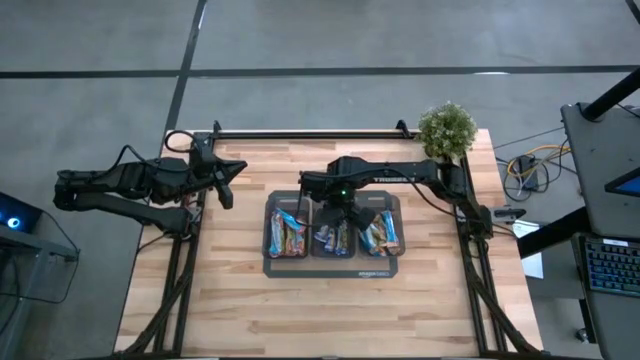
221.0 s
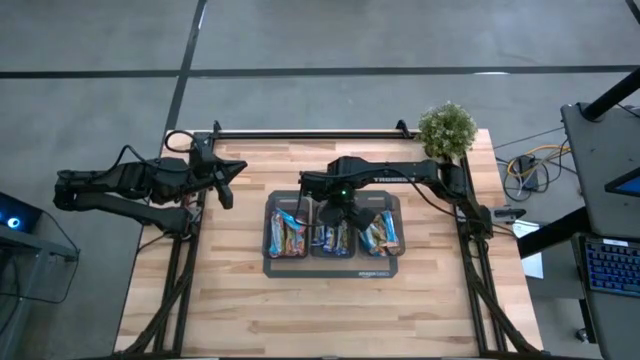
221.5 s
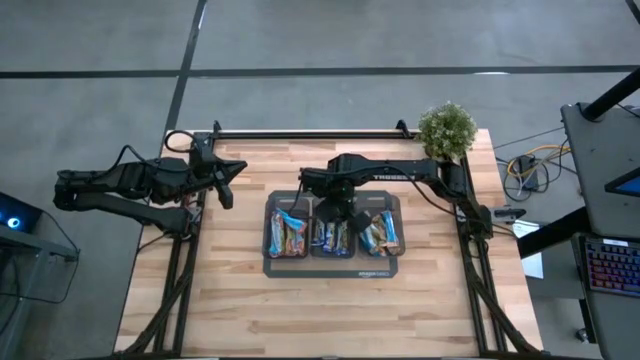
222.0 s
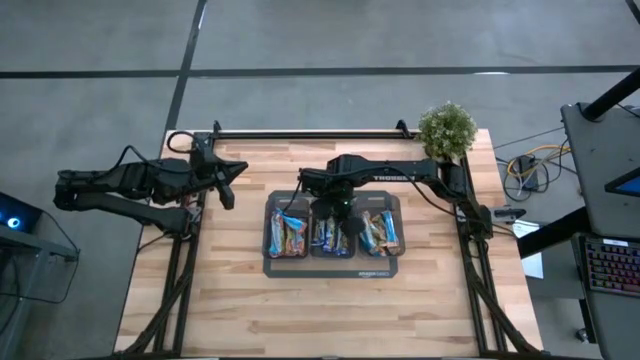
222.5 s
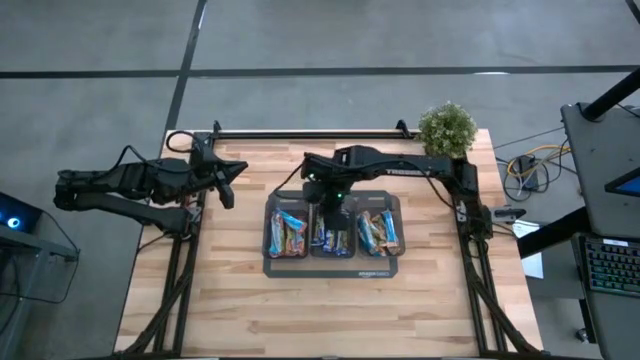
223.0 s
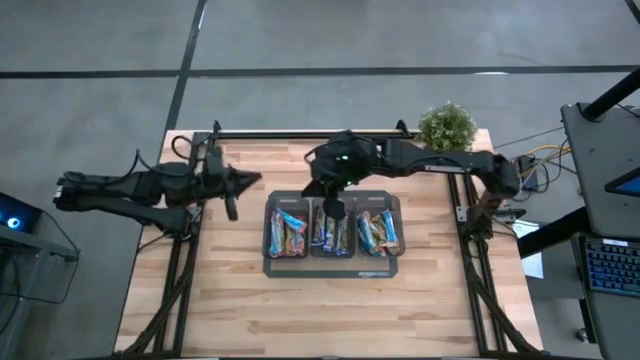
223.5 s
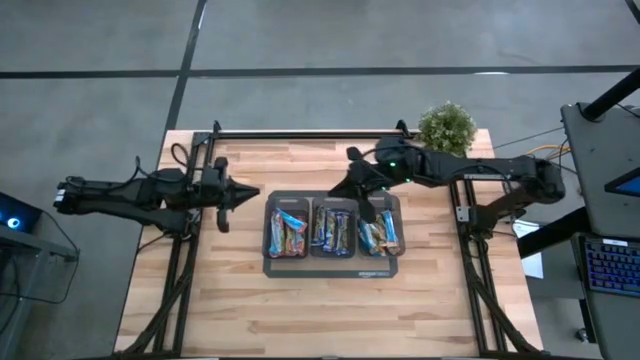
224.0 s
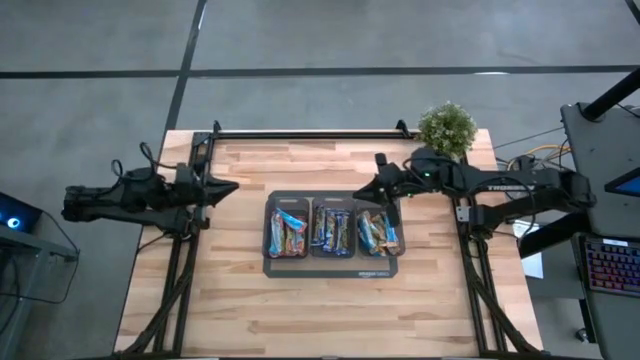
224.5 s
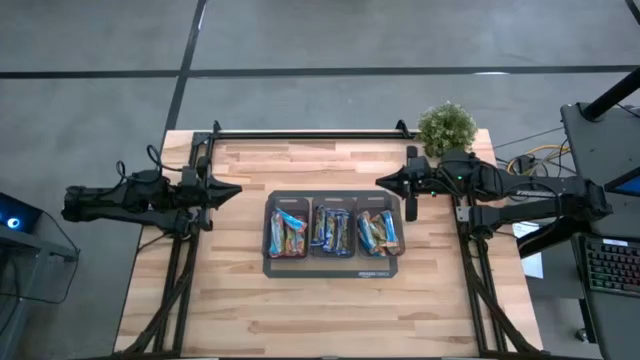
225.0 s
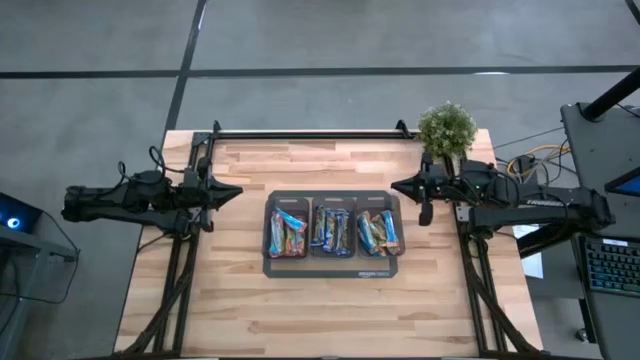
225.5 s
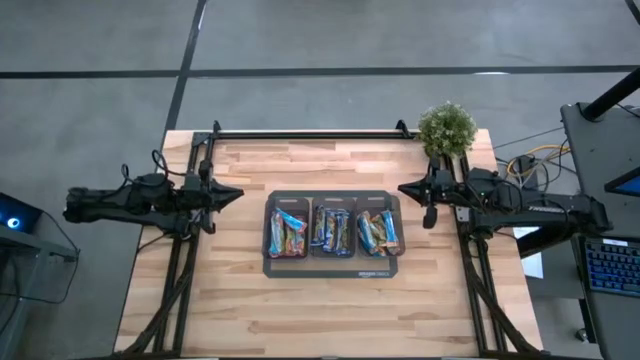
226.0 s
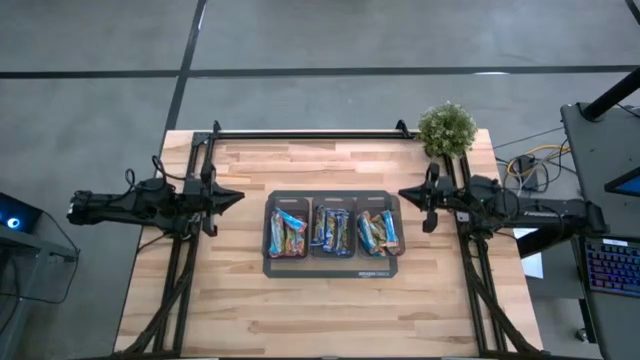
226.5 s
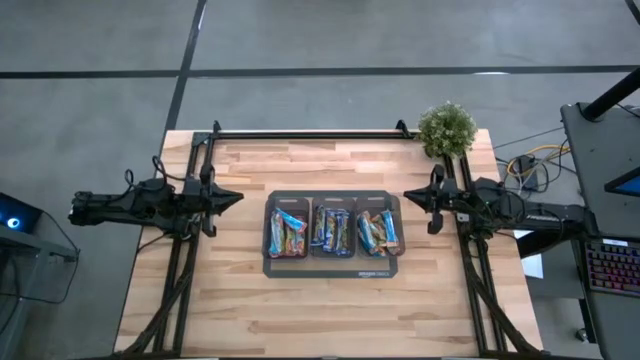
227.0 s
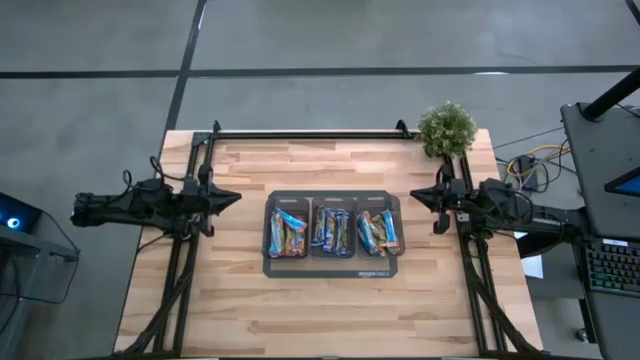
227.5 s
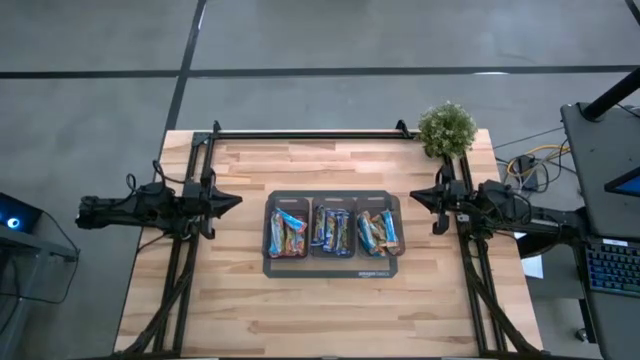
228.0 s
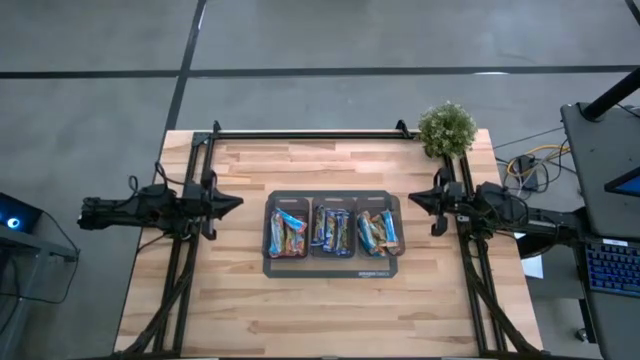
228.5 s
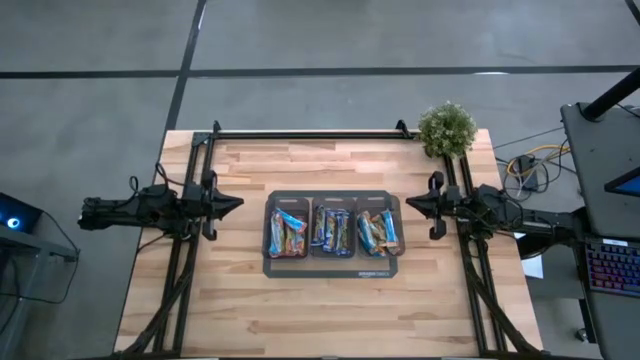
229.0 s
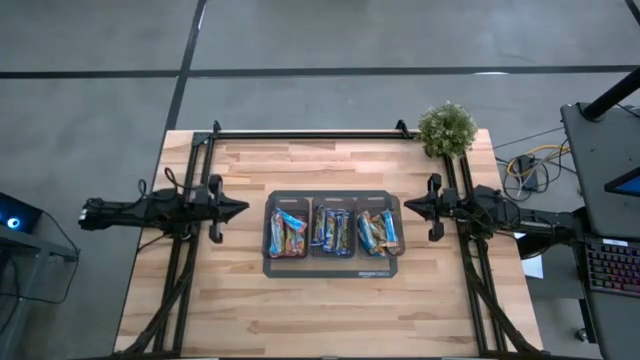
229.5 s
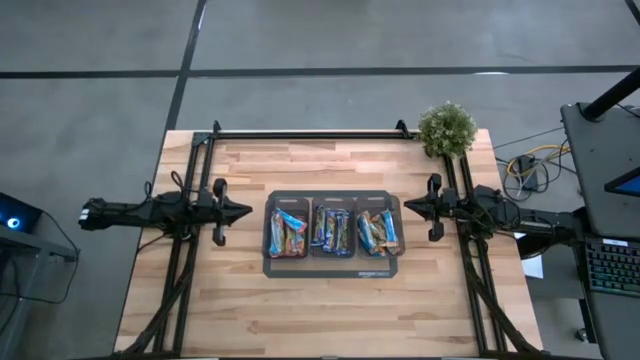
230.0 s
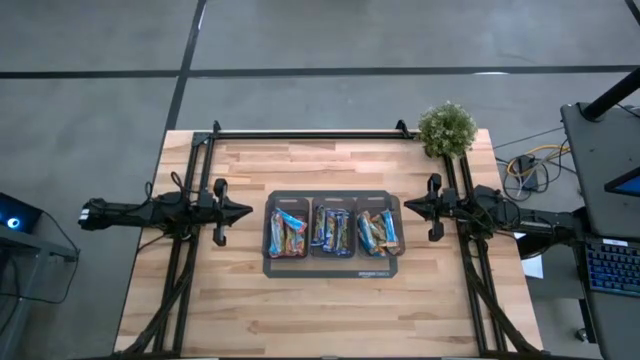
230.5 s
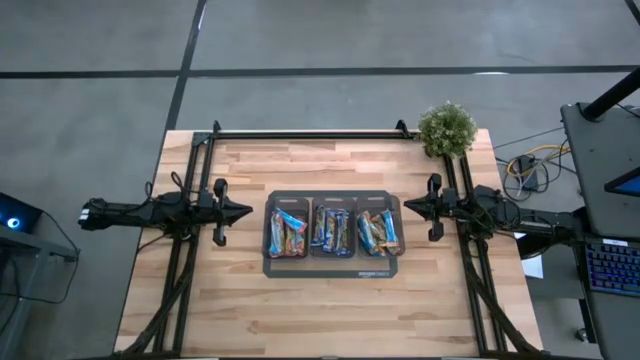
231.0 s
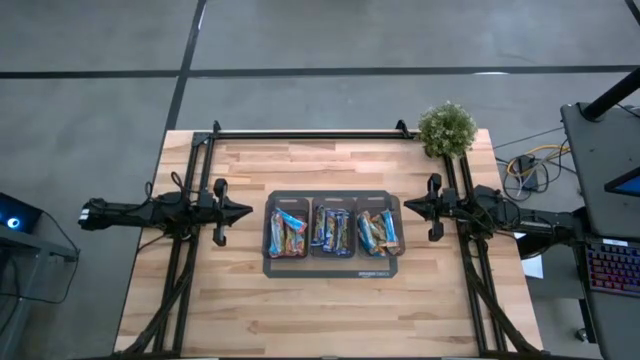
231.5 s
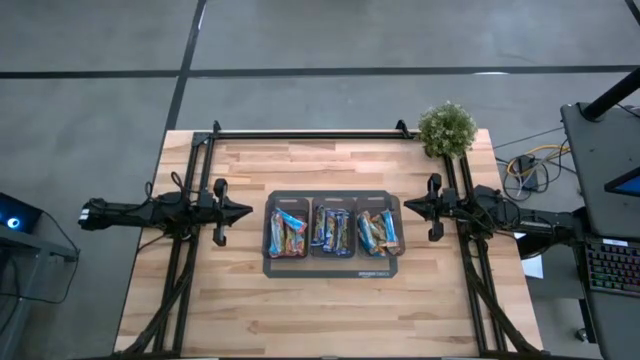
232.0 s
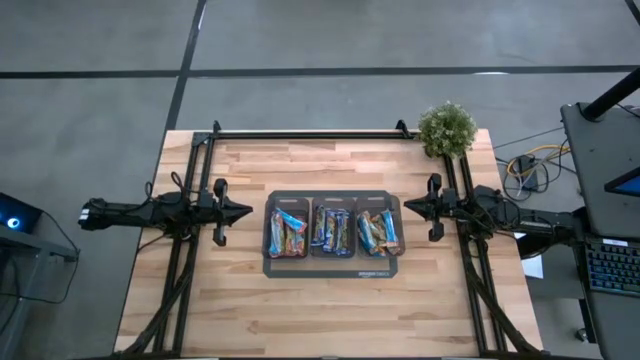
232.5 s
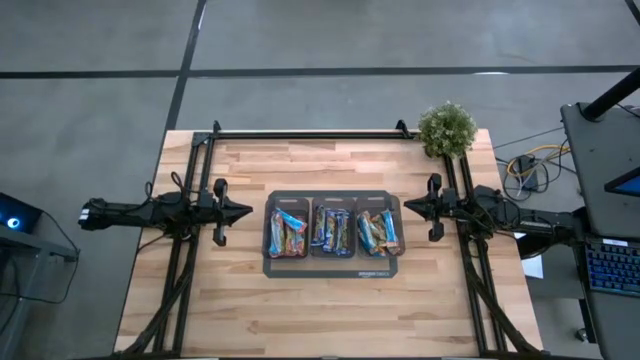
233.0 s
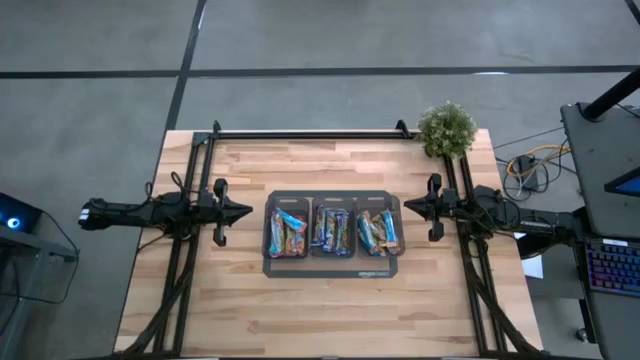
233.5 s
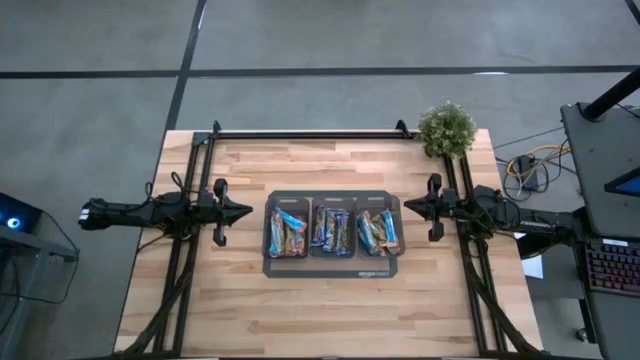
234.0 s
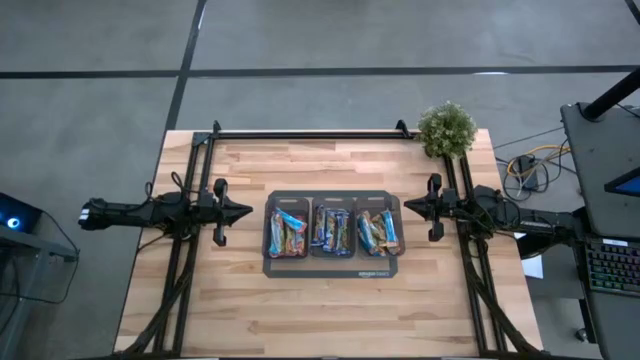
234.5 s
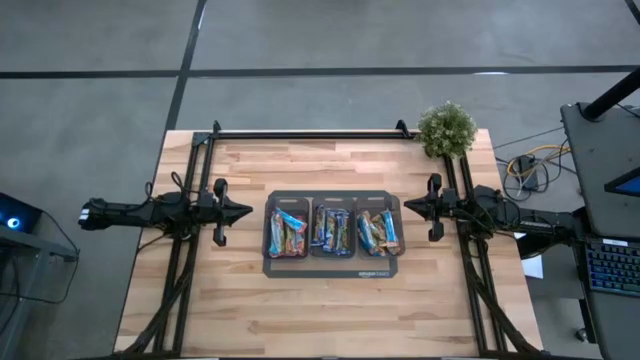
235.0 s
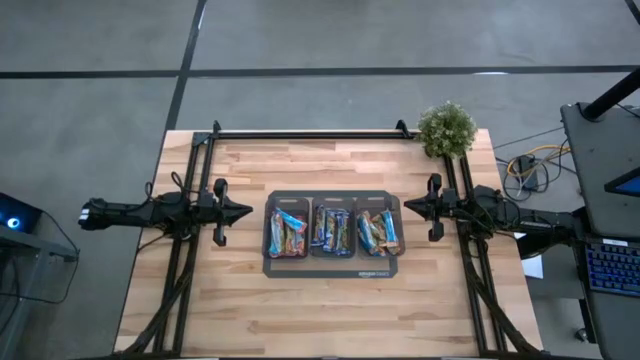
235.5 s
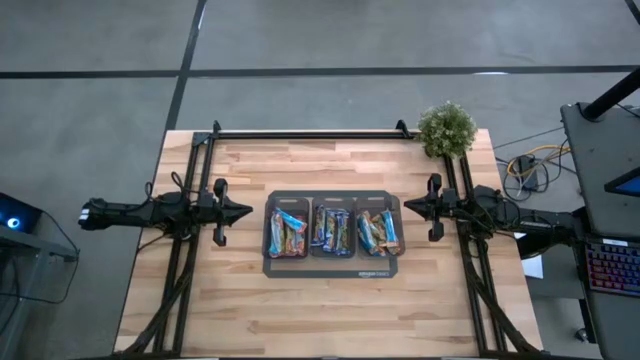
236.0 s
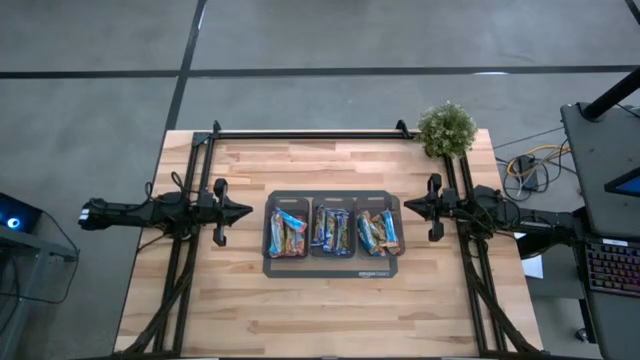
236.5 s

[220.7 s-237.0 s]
Task: Pick and place Granola Bars by type
Return to Home Position

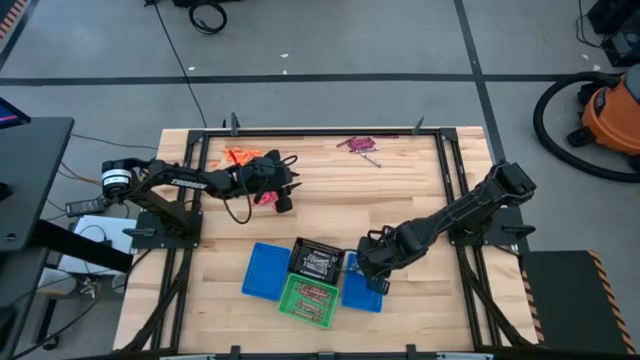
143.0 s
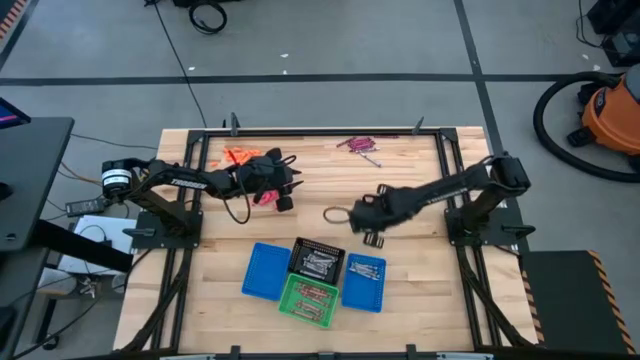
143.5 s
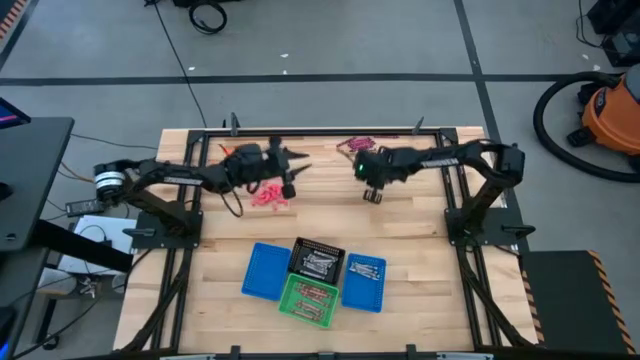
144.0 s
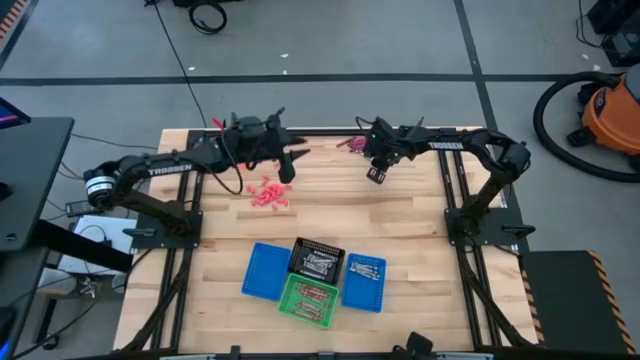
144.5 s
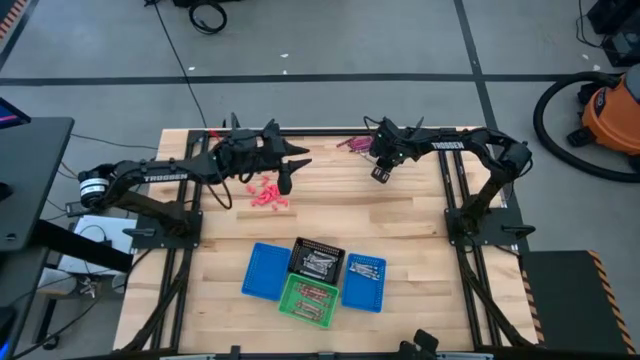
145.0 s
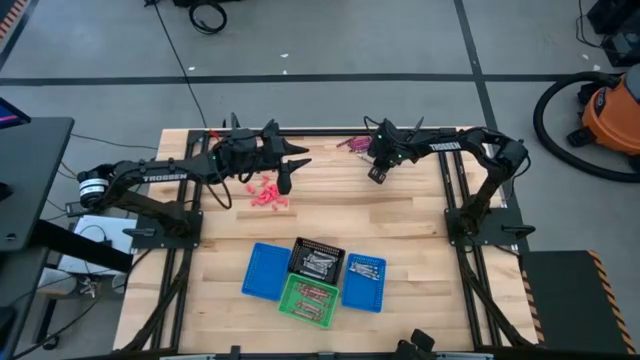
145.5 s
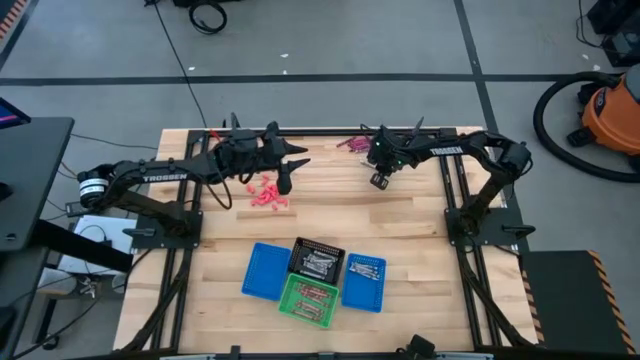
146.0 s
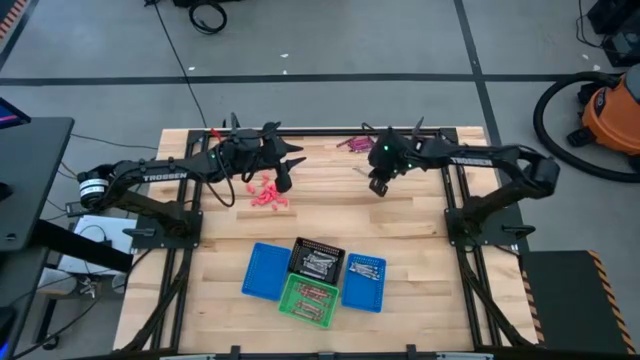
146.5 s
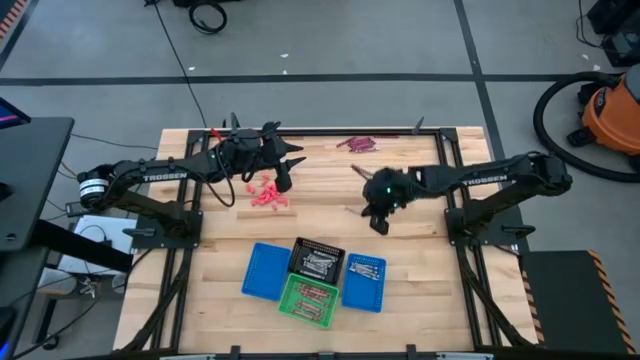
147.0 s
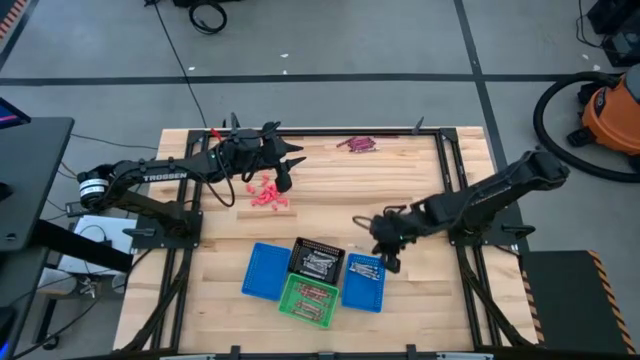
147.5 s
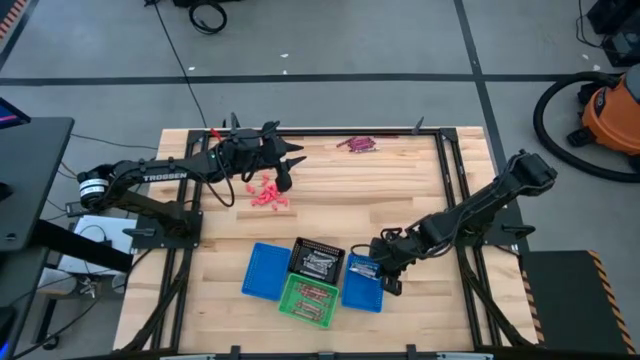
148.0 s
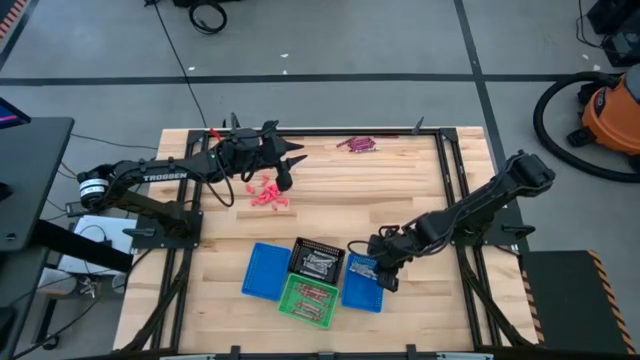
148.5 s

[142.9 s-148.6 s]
Task: Sort crayons
Put the white crayon into the right blue bin
